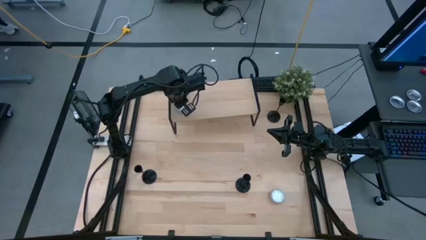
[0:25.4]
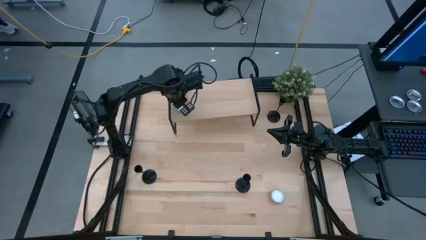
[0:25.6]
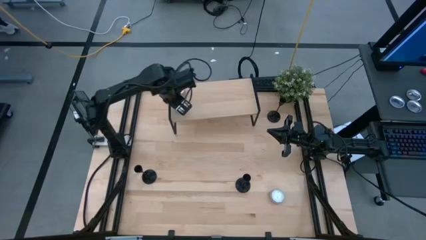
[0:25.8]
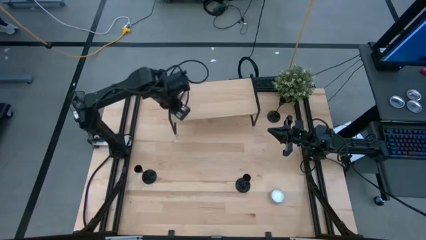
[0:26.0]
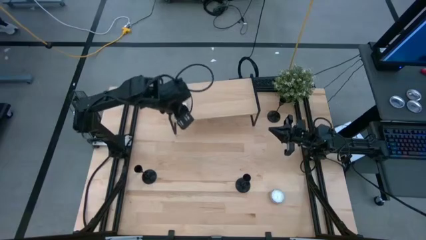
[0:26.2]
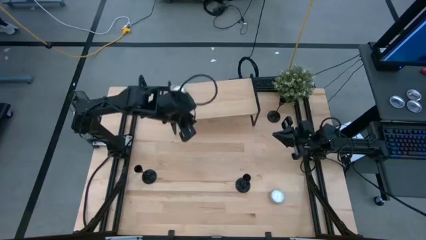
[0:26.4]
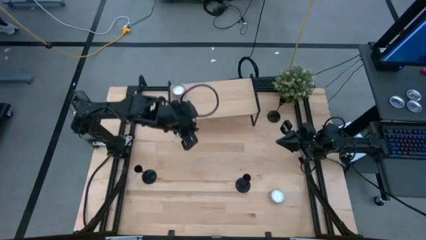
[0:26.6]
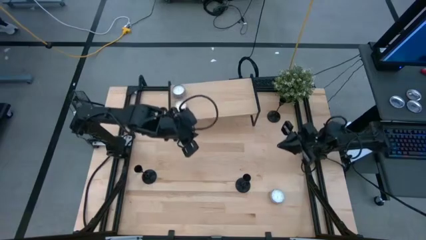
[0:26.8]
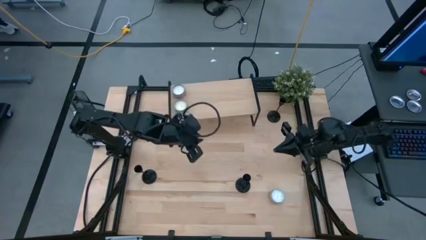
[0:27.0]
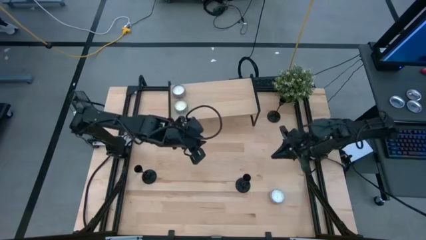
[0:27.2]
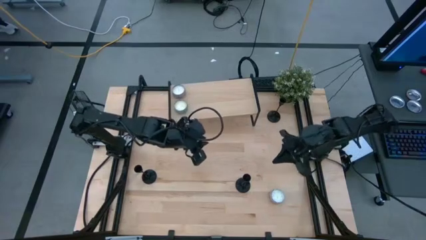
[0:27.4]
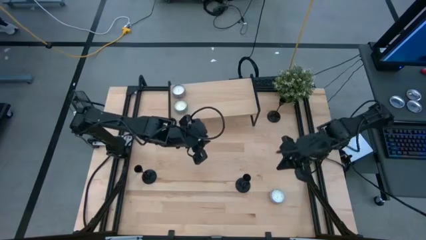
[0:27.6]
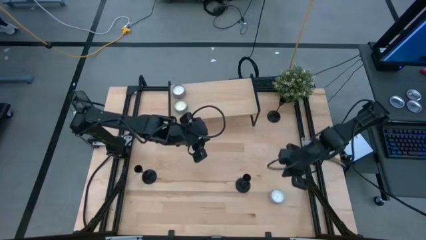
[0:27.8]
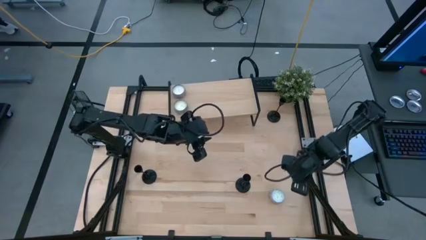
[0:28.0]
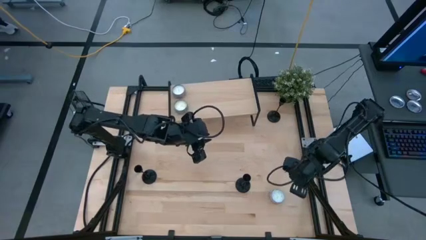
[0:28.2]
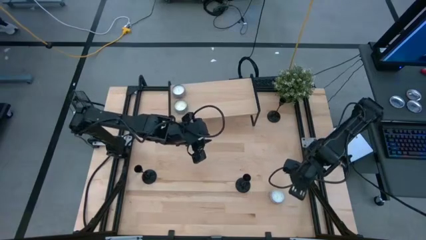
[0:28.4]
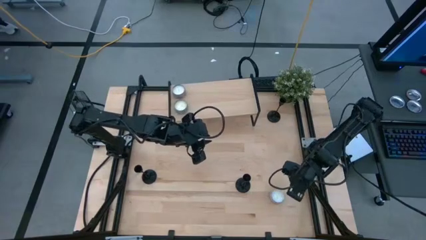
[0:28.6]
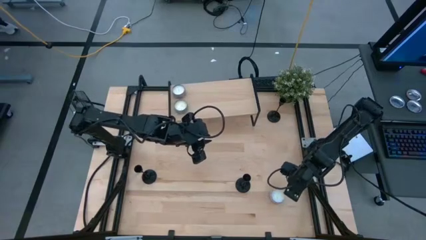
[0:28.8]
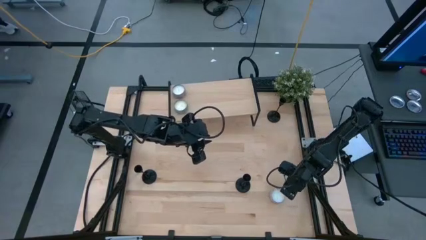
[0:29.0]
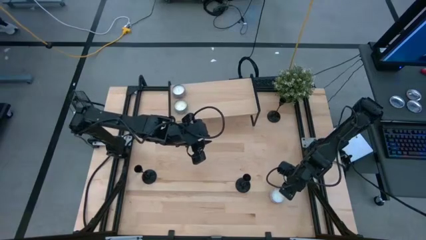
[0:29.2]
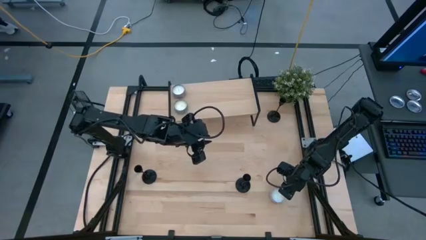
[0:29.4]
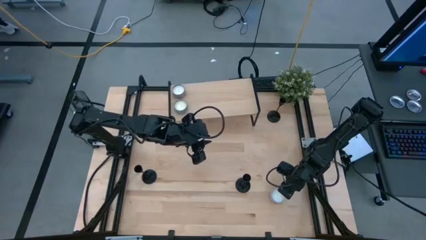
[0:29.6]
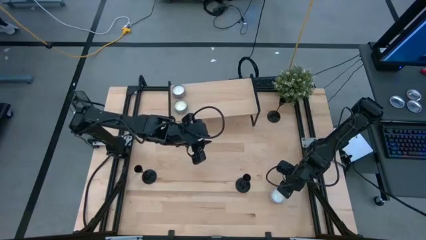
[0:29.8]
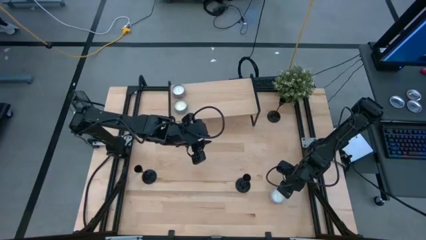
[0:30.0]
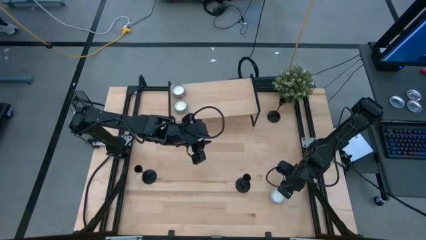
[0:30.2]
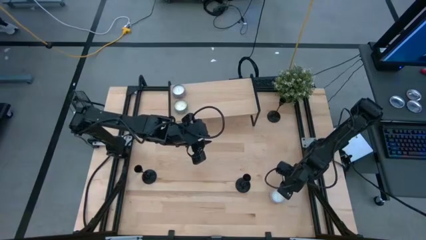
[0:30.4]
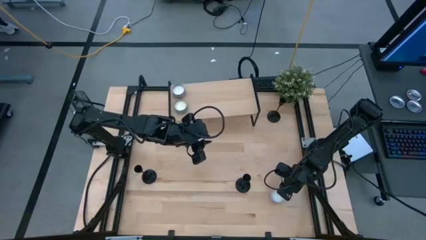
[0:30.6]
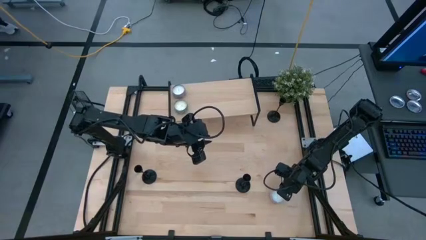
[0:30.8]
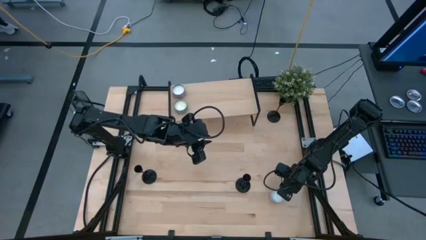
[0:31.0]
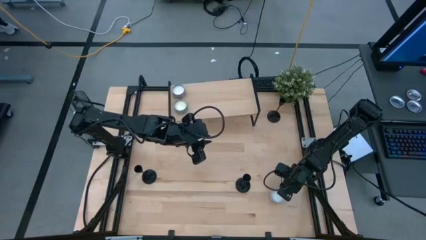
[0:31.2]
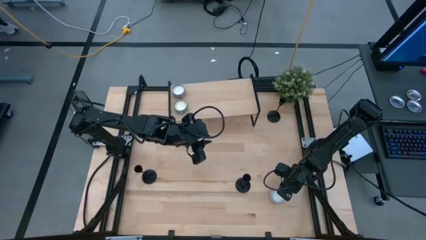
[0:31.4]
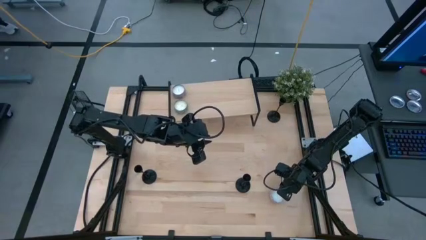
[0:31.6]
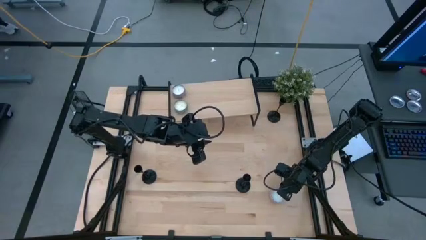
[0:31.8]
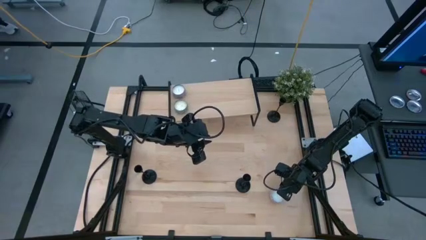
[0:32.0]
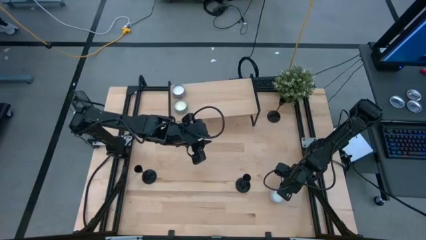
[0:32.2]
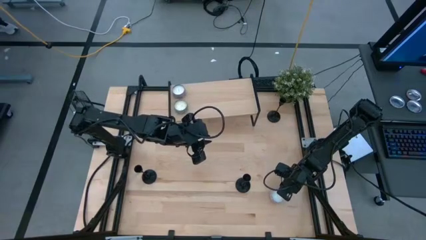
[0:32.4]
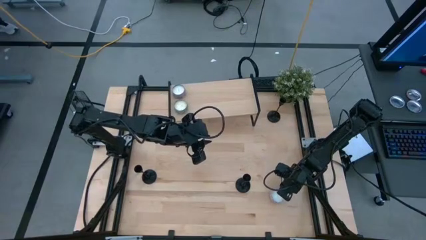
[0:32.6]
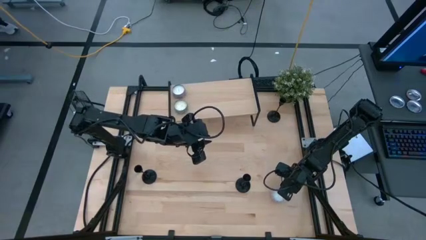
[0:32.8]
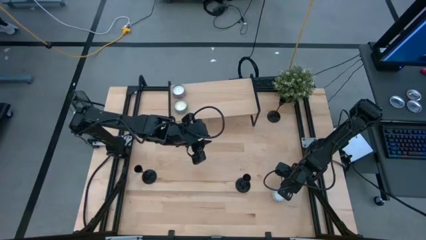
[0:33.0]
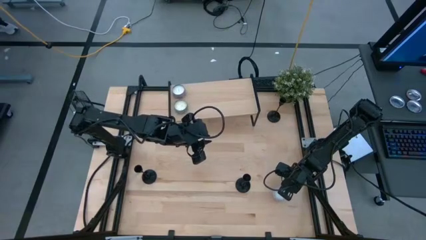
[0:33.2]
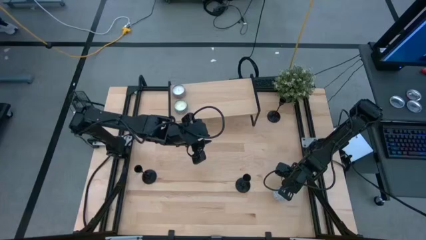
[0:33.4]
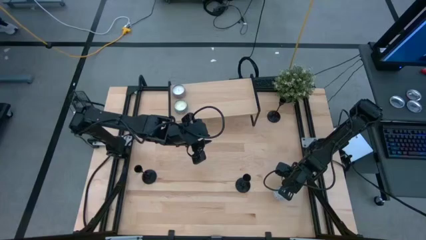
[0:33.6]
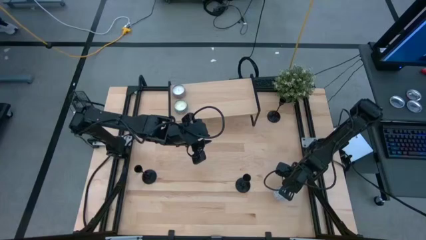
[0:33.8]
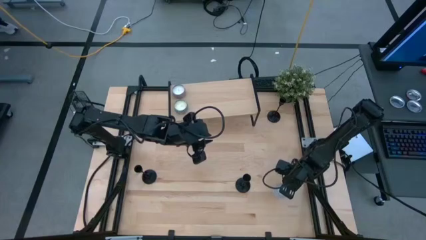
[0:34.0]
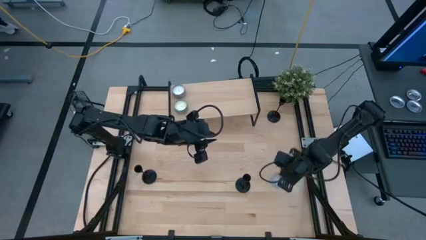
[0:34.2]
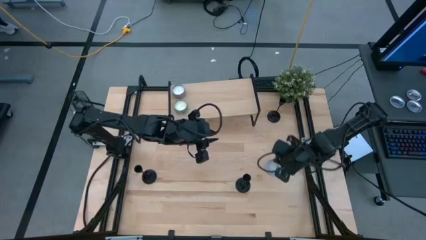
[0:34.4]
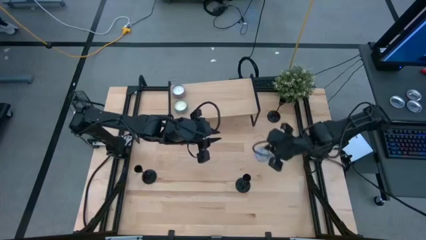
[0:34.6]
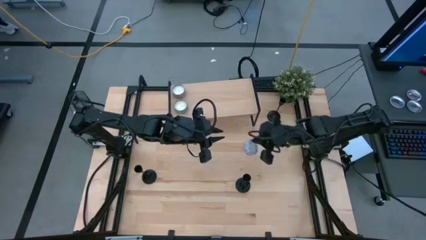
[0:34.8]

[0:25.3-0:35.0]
Task: Pick & Place candle stick holders
Put the white scented candle on the shelf

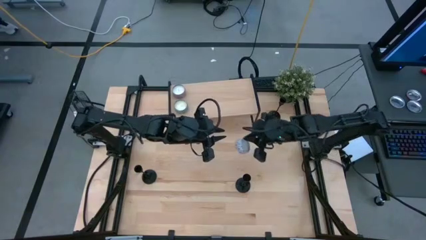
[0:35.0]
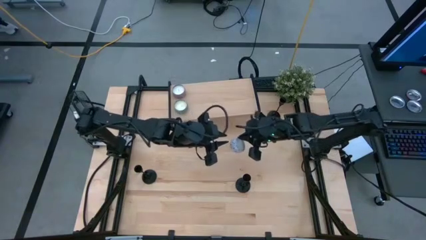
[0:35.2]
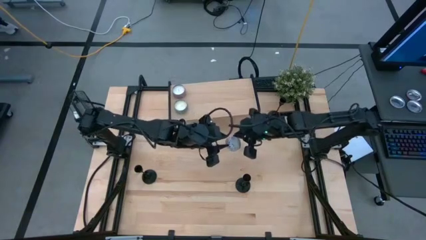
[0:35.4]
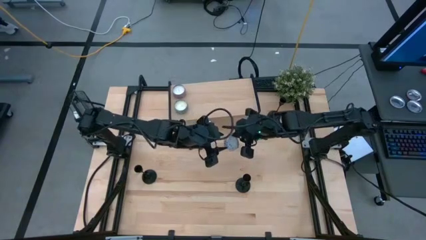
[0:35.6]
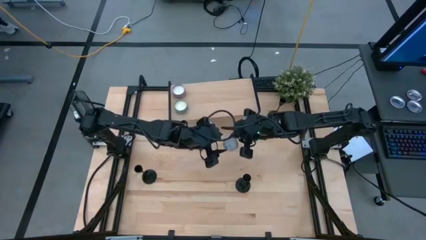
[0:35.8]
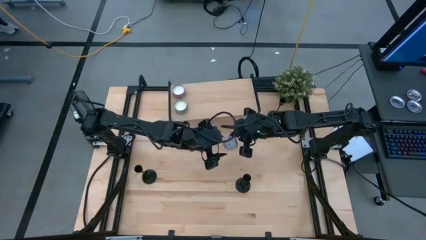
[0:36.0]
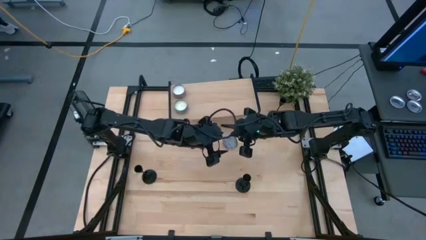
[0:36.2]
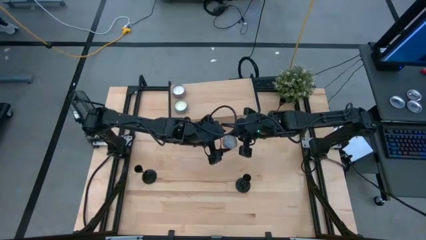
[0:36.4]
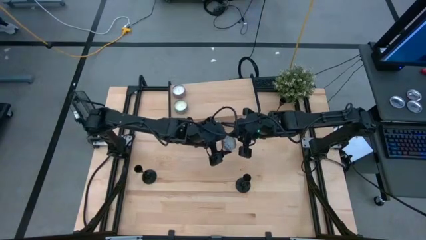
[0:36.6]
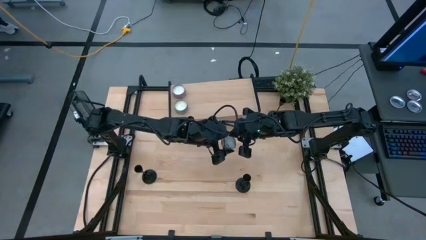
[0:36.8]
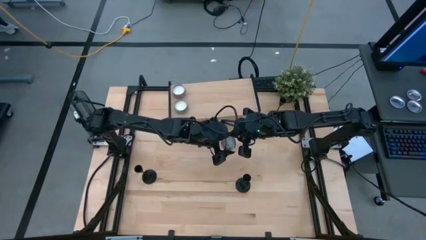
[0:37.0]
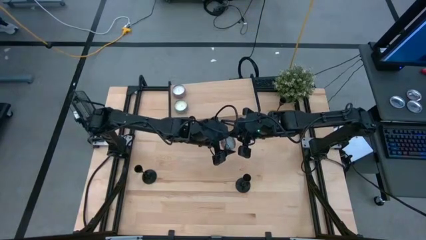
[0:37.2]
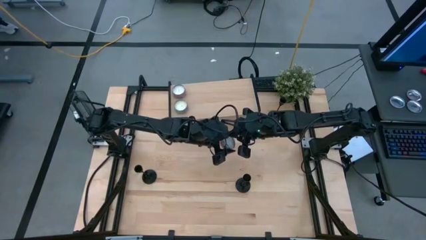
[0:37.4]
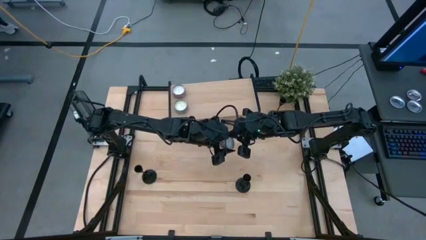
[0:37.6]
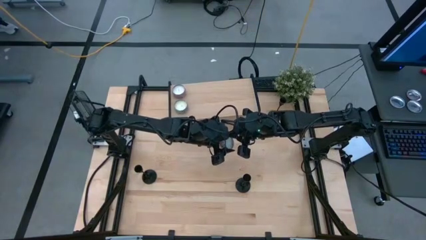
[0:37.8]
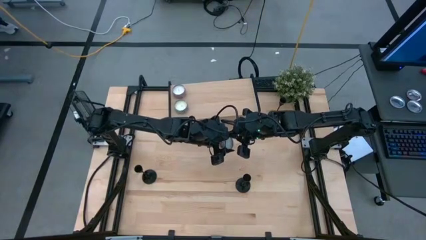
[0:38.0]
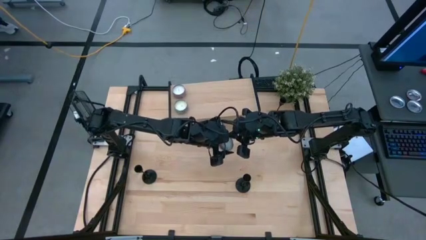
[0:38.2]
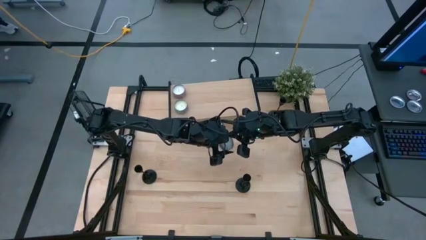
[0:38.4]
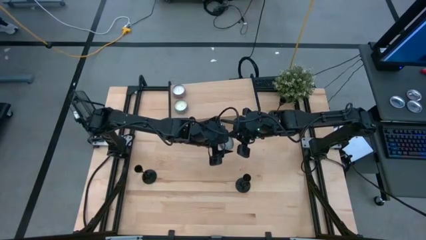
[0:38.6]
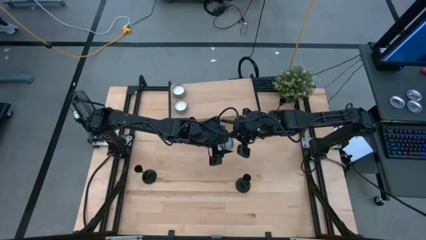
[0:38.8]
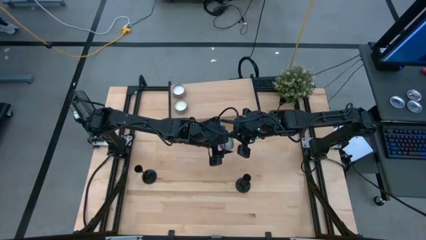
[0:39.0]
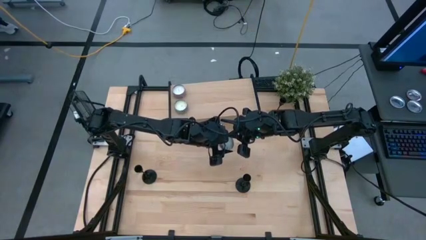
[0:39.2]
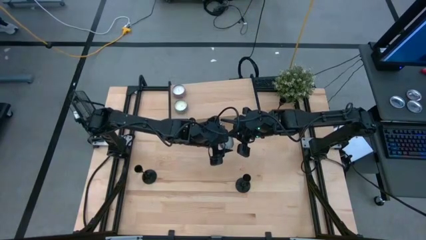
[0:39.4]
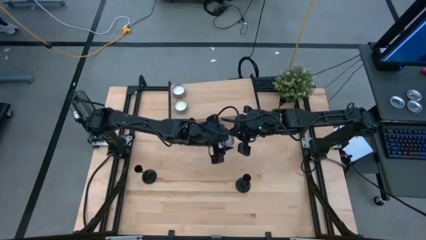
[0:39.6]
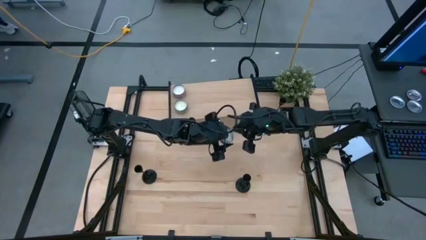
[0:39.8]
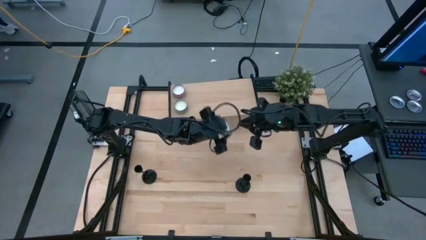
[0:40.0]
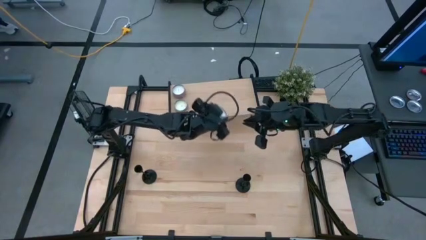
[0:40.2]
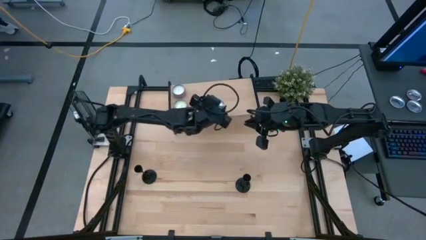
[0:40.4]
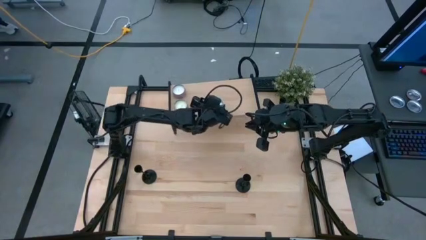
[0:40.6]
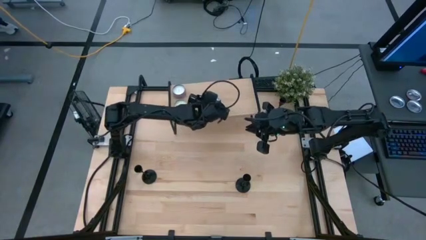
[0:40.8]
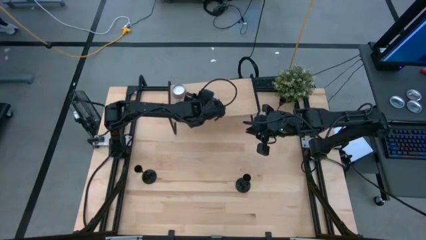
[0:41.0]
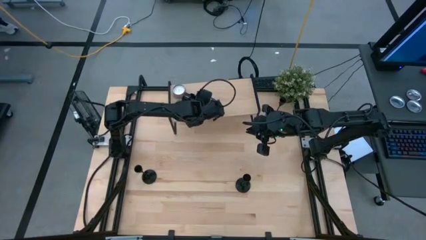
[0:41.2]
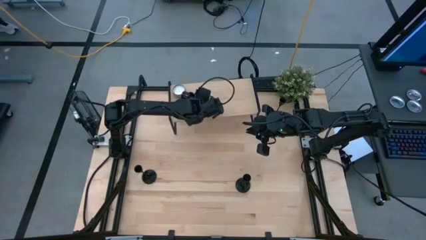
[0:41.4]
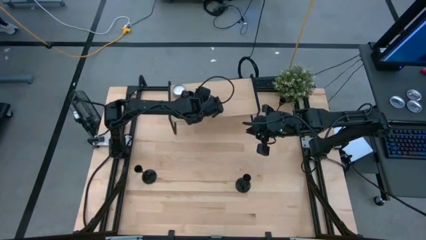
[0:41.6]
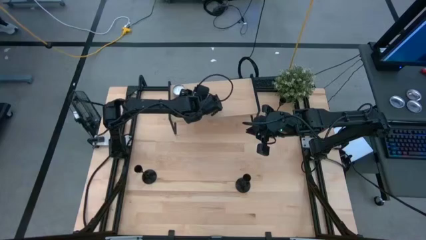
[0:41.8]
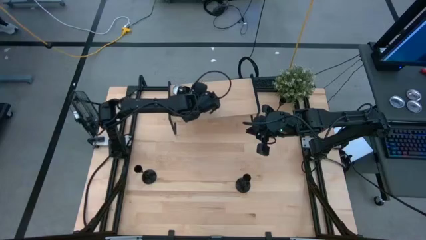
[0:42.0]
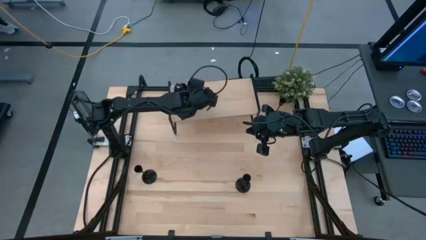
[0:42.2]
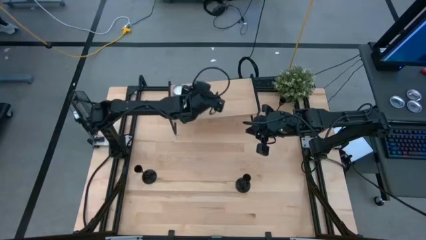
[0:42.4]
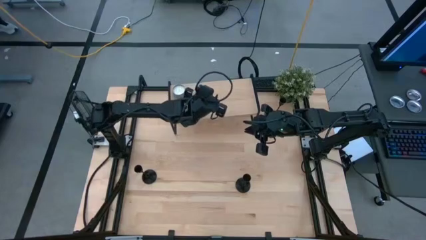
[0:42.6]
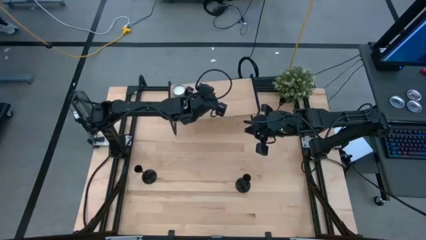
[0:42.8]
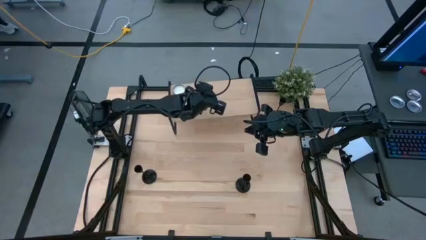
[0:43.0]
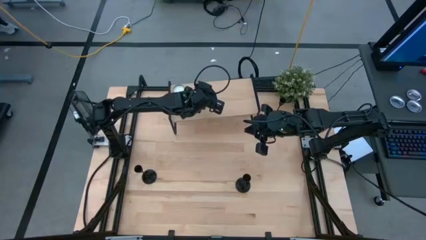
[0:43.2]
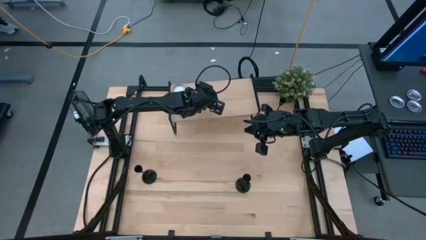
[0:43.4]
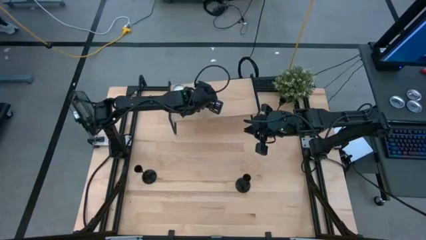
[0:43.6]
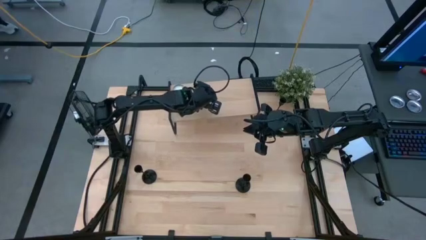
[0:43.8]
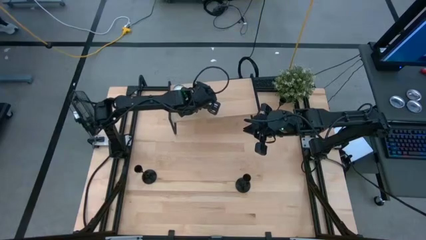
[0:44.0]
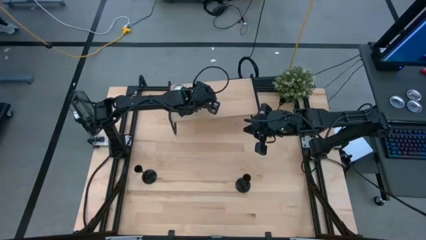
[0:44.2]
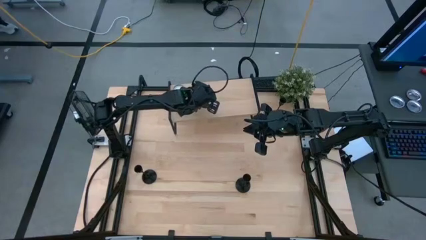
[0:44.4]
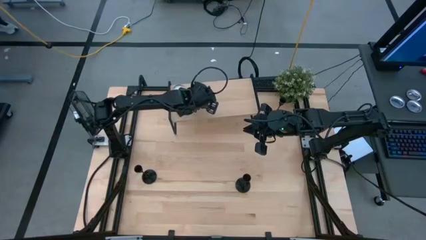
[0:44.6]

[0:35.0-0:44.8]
Put the white scented candle on the shelf
